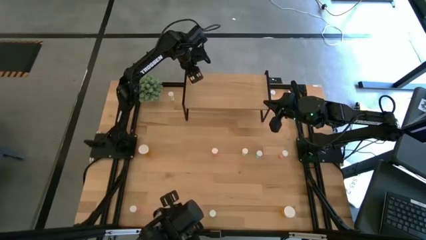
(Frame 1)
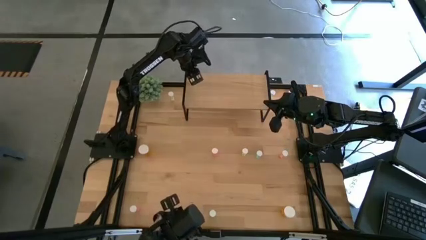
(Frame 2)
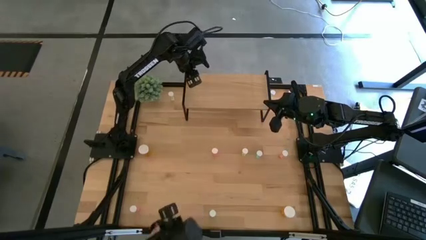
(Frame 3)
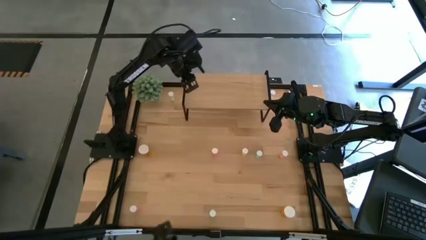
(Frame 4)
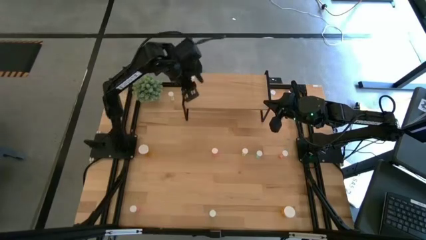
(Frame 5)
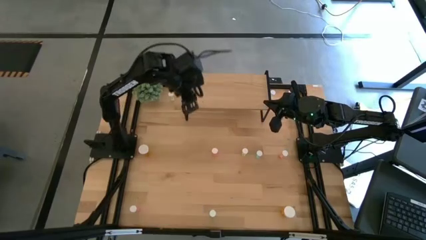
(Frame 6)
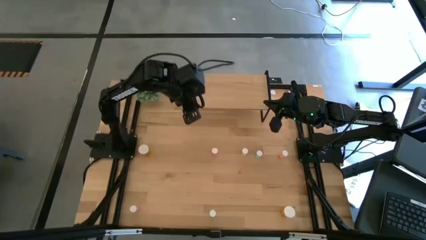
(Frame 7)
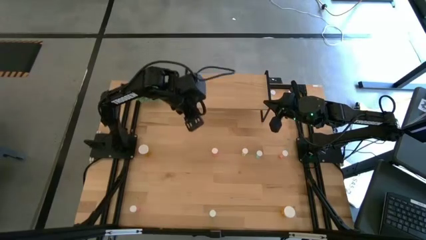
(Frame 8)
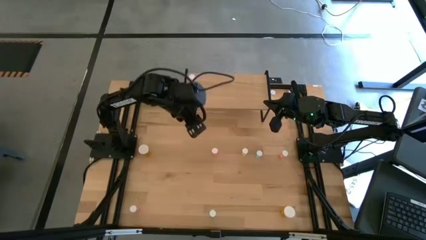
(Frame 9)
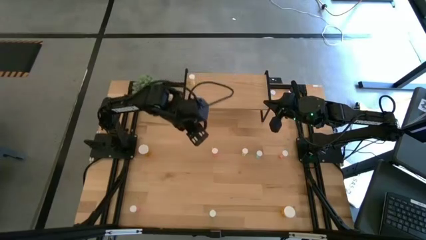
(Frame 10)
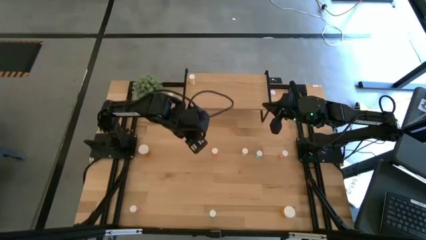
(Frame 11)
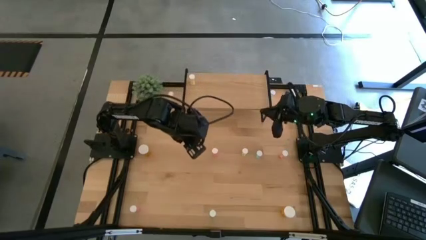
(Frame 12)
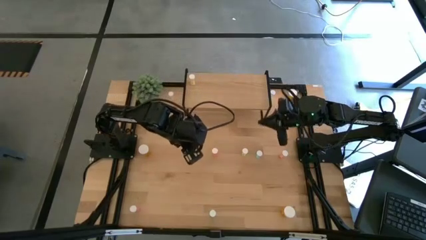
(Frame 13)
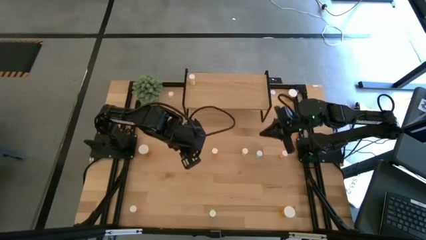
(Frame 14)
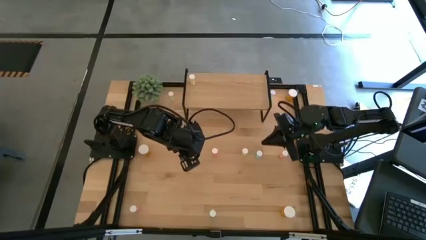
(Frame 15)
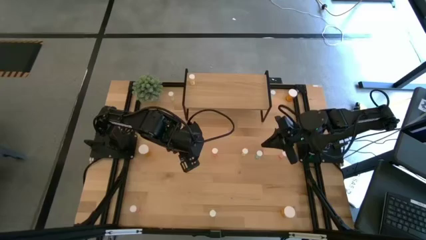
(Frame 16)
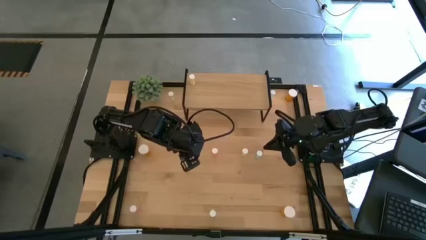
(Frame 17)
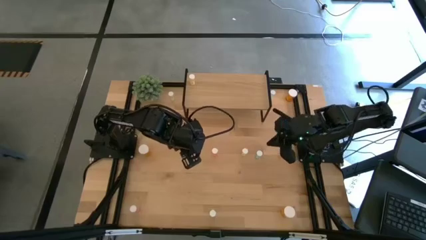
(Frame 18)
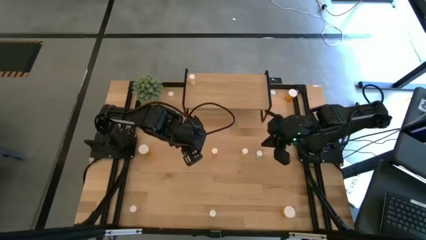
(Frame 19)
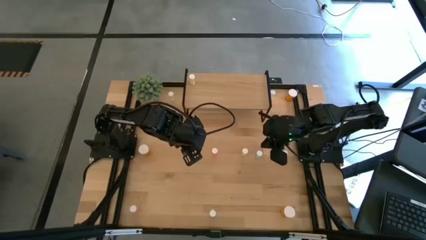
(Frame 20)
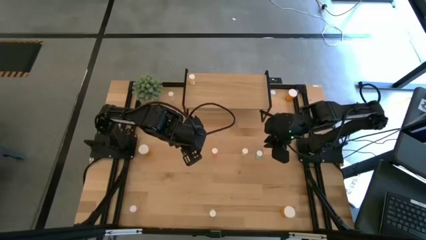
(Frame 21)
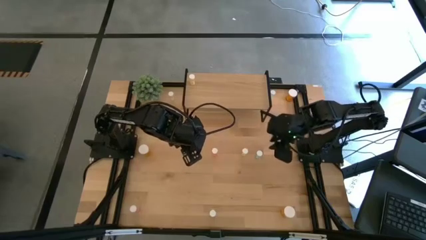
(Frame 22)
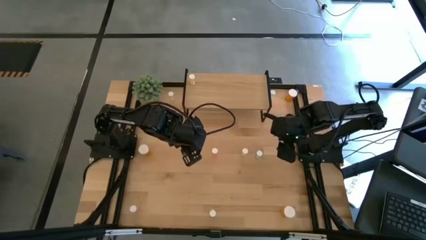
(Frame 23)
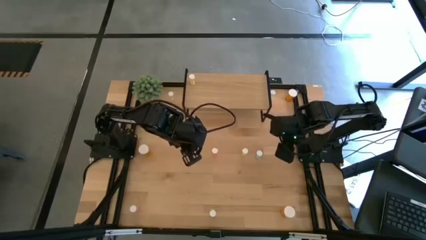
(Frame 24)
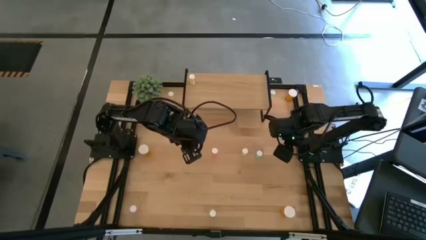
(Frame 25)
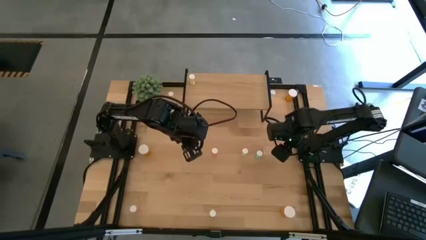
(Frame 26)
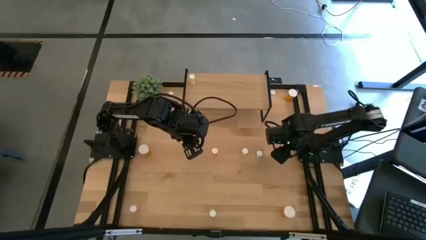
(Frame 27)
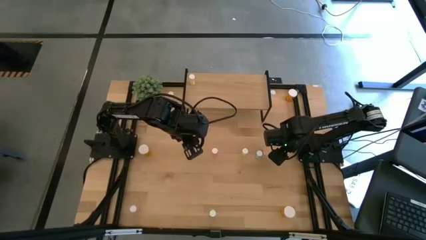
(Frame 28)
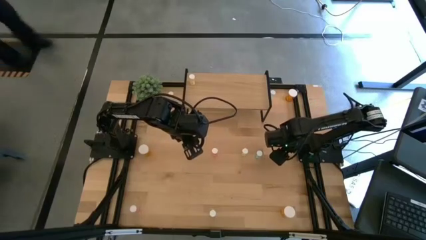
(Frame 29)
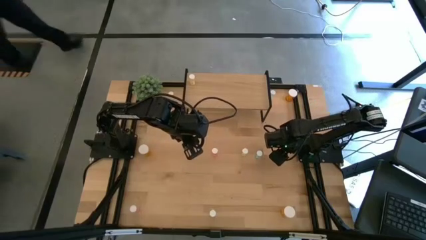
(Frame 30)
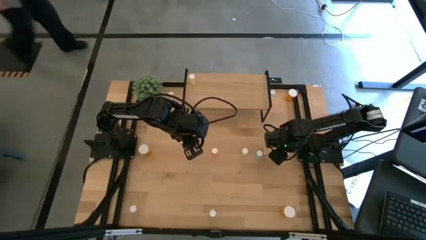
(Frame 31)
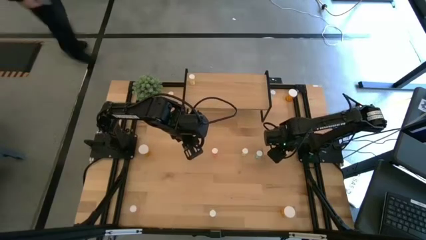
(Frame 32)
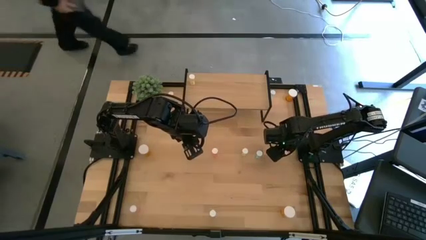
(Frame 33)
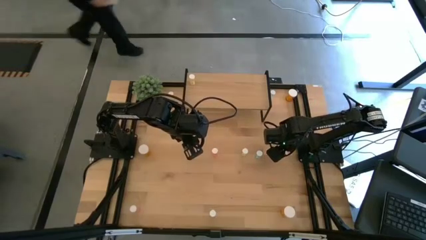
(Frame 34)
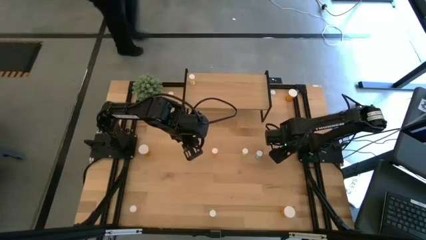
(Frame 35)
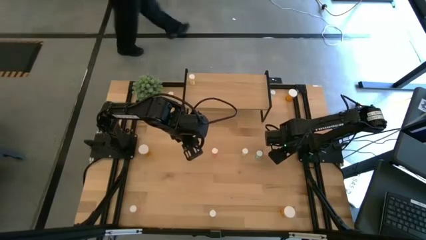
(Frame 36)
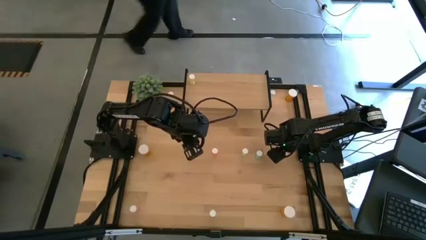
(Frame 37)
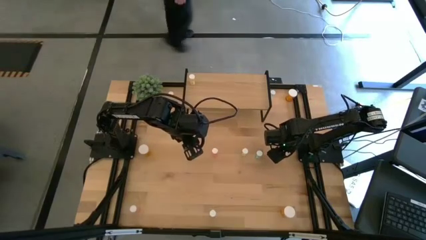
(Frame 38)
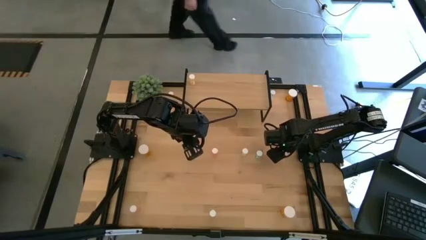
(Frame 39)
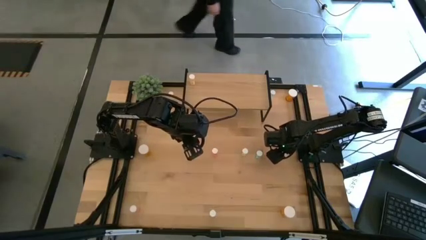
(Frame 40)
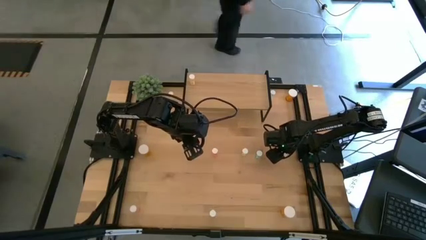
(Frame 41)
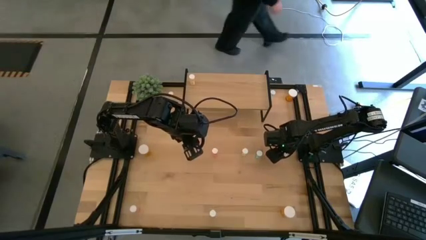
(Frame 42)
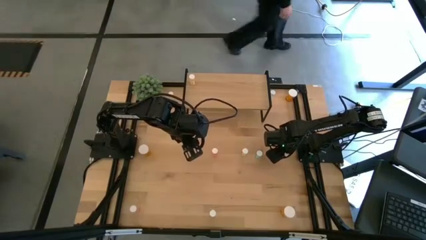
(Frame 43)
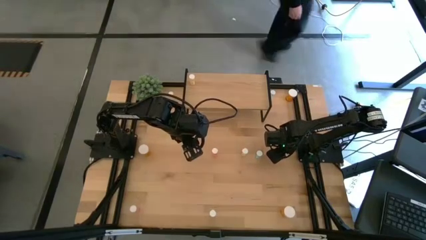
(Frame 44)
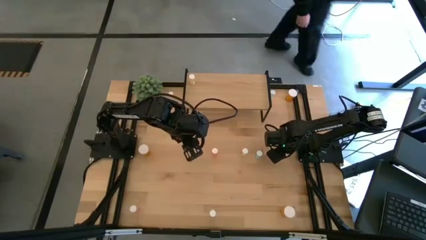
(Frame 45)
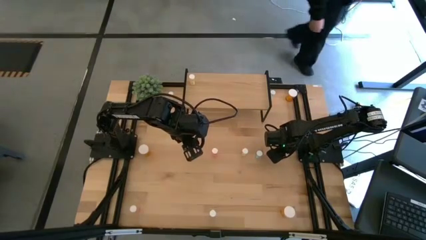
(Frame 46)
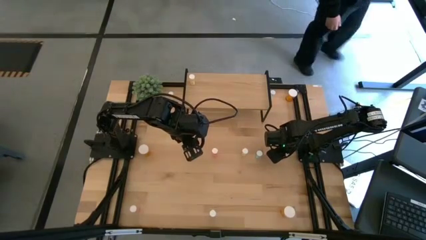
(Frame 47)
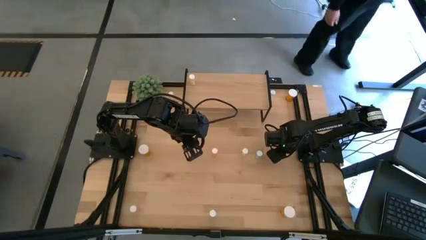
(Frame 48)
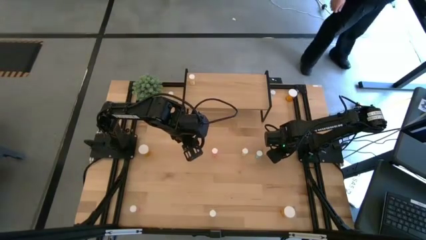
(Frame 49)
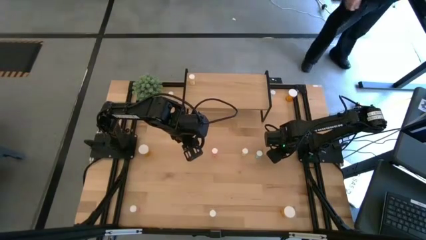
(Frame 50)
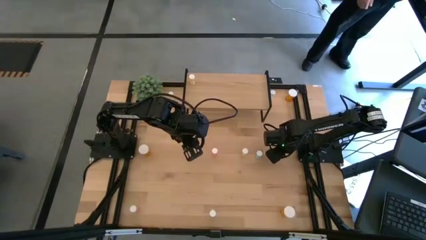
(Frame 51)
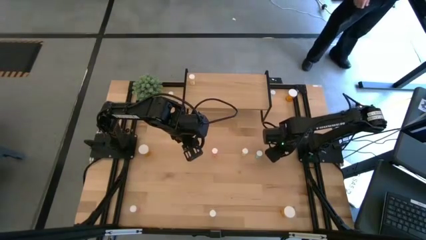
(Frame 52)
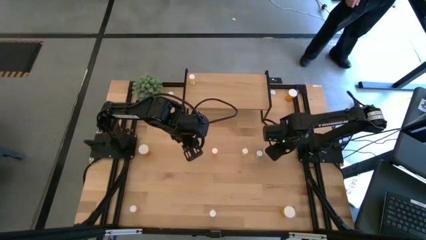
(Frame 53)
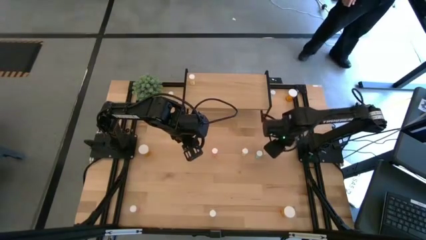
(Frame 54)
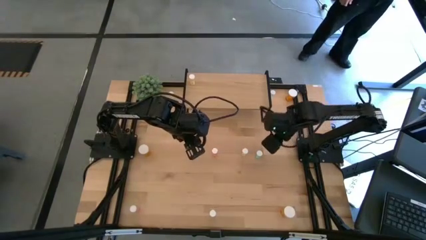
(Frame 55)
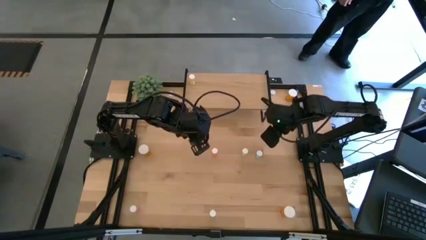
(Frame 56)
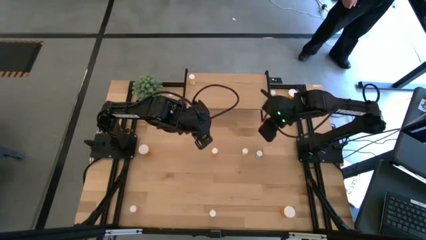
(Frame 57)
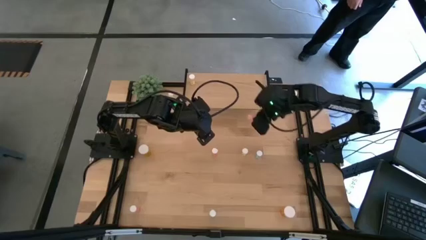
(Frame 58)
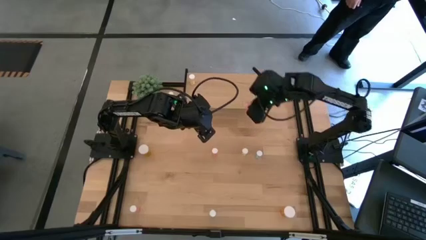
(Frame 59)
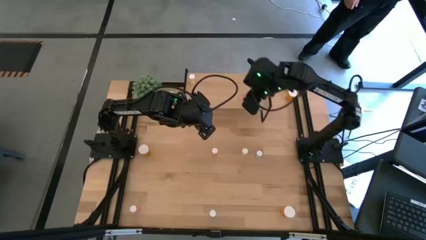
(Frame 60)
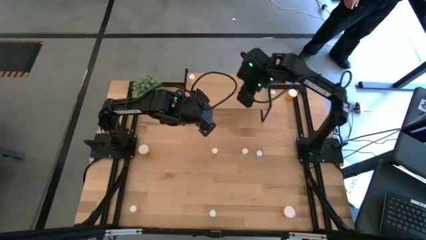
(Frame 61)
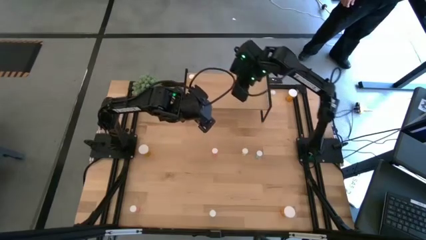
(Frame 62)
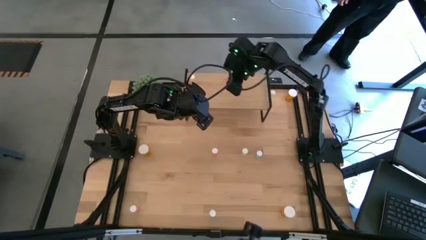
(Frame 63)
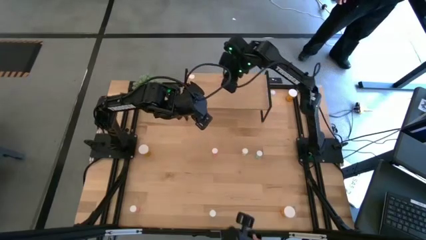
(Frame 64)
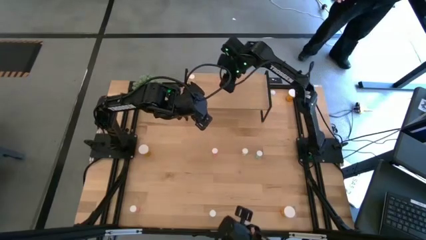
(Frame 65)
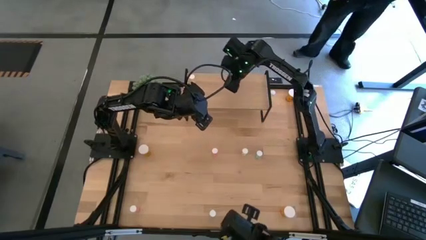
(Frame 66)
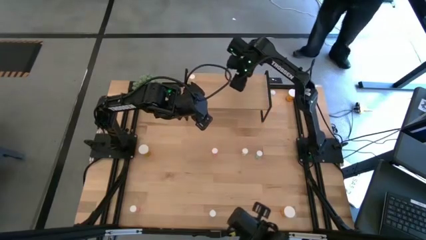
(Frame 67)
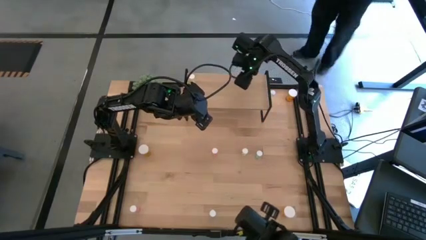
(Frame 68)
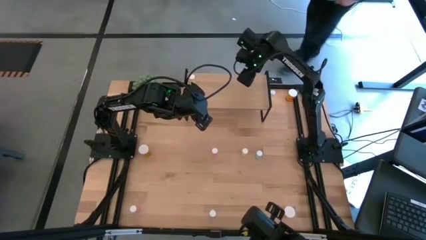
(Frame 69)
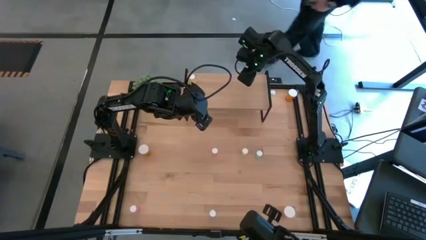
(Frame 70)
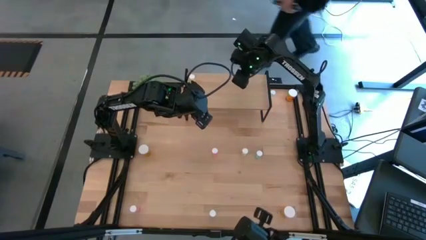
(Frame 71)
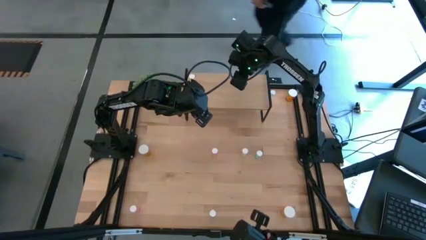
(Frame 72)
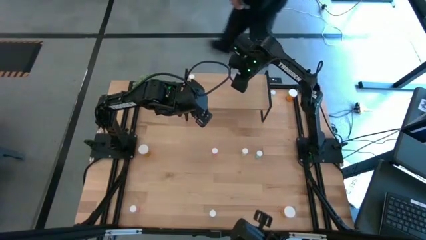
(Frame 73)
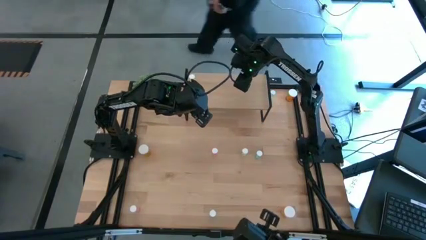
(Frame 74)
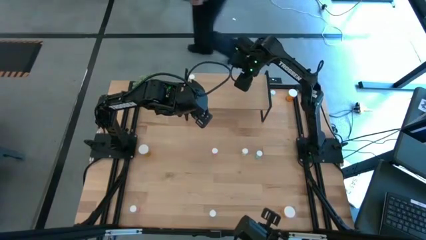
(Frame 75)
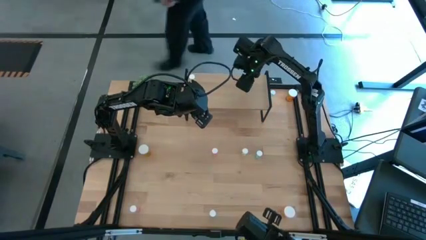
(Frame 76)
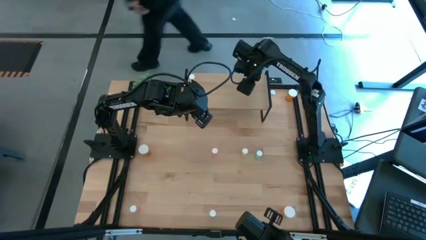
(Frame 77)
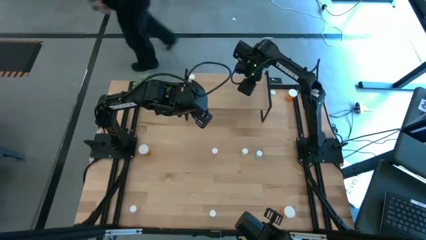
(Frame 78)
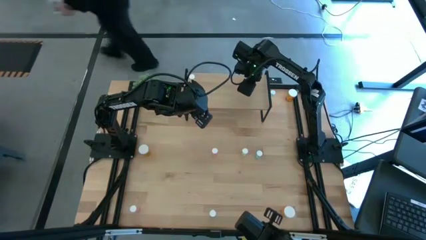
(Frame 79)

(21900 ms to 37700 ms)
Task: Pick and place medicine bottles onto shelf by color
Put the top right pink pill bottle on the shelf

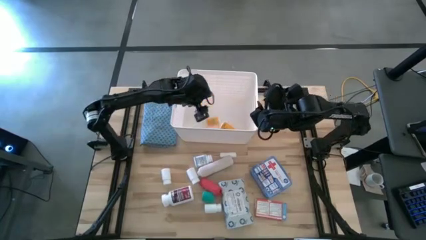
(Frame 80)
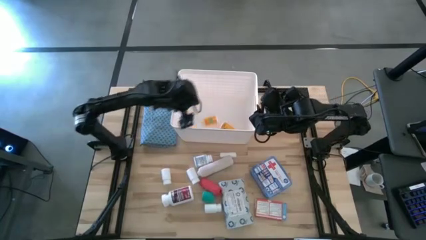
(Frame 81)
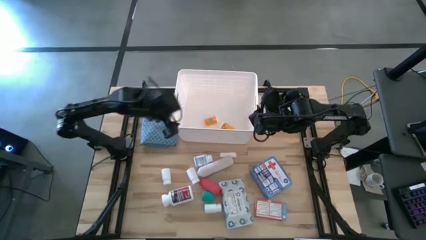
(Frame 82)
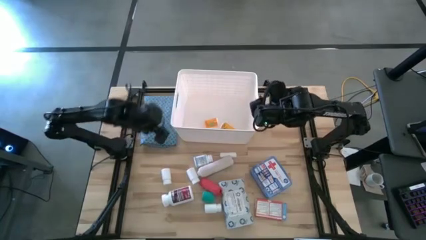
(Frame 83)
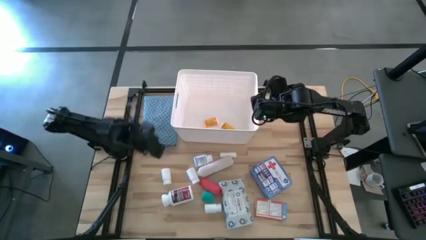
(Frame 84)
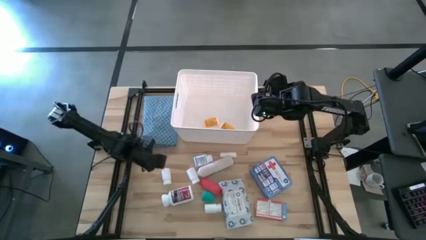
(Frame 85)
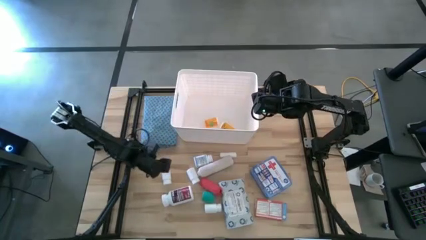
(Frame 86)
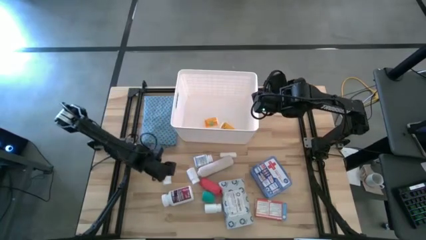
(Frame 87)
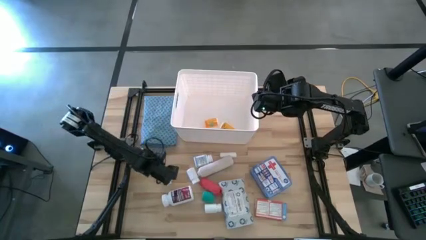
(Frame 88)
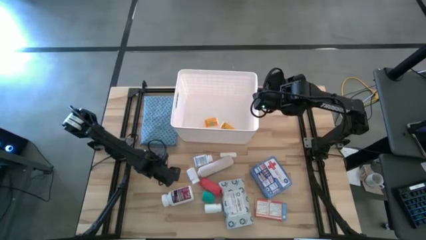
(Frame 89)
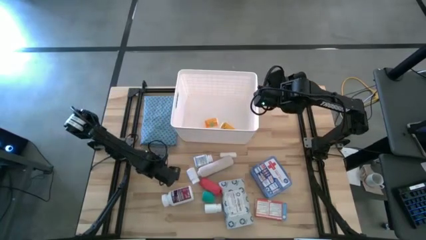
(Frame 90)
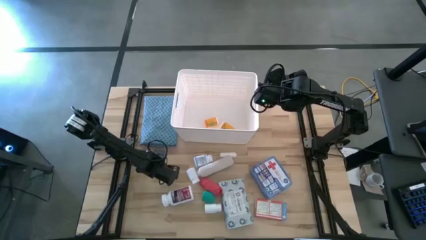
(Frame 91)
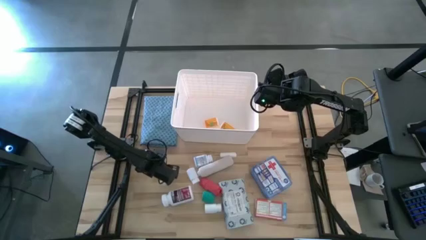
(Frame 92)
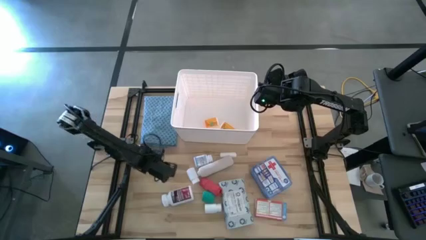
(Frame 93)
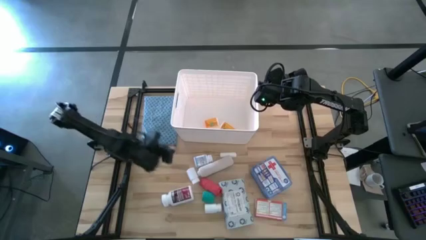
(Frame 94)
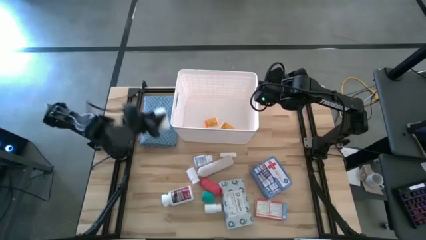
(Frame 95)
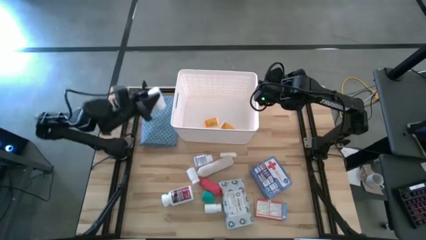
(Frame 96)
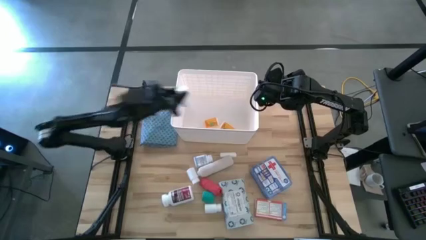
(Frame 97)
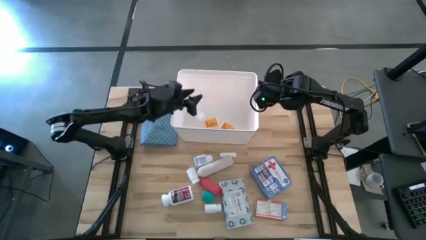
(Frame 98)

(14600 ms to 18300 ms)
Task: Pick & place medical supplies in basket/bin
Put the top left white pill bottle into the white container
